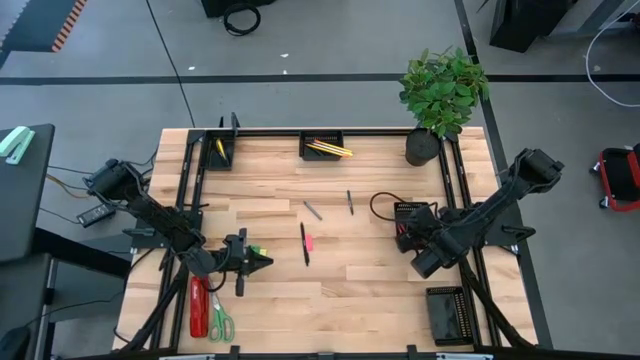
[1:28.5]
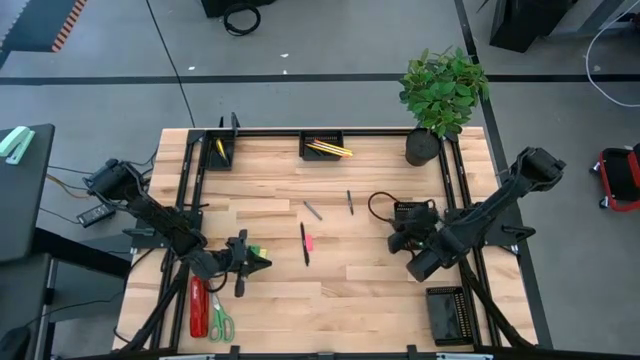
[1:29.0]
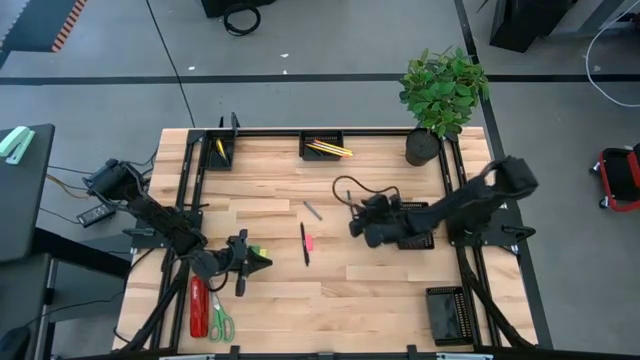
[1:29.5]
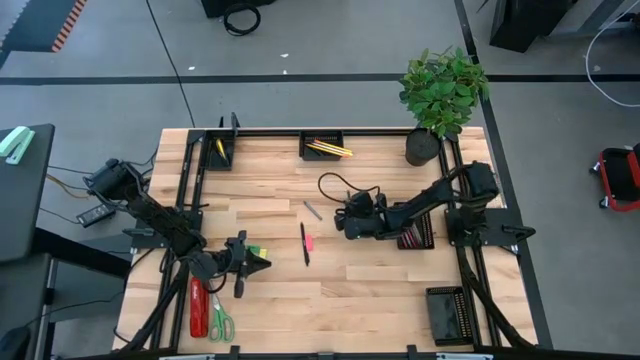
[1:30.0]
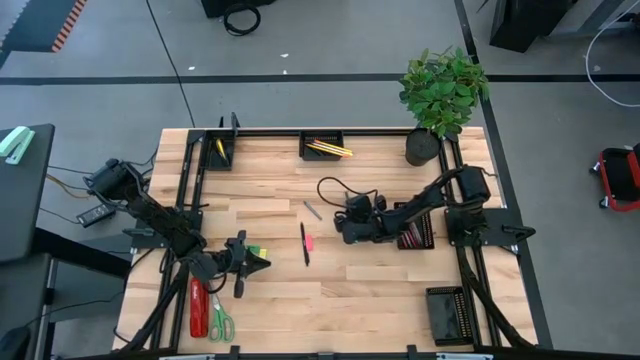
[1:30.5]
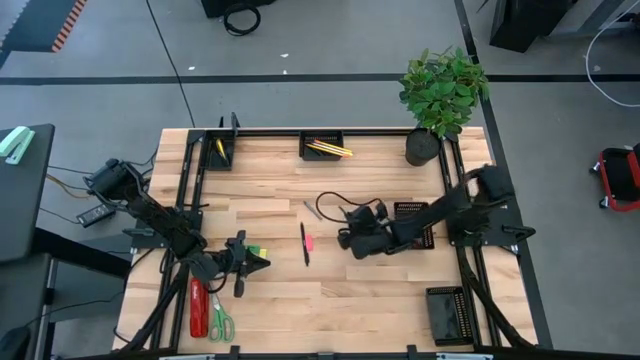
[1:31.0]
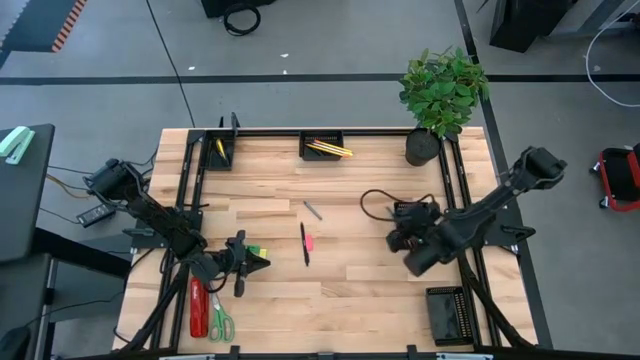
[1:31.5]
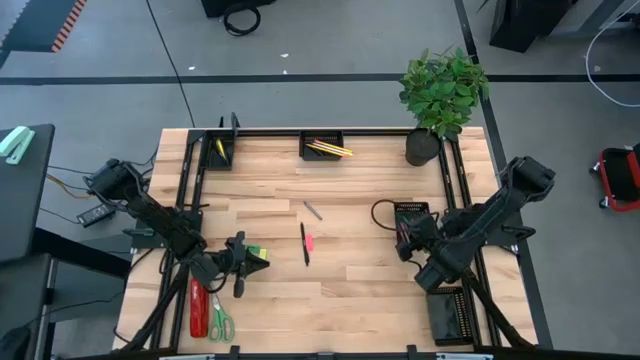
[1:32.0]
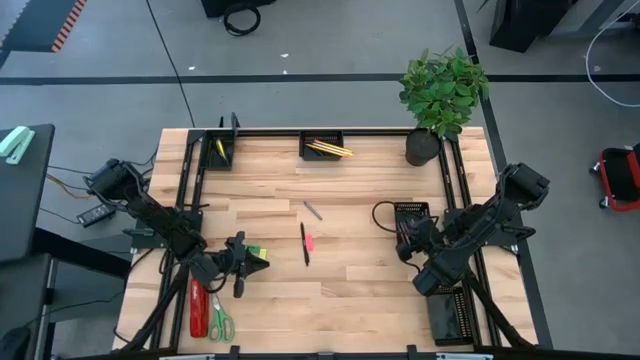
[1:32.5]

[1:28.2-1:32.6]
Task: Sort crayons/erasers/pens/pencils in bins
Put the green crayon into the middle right black bin

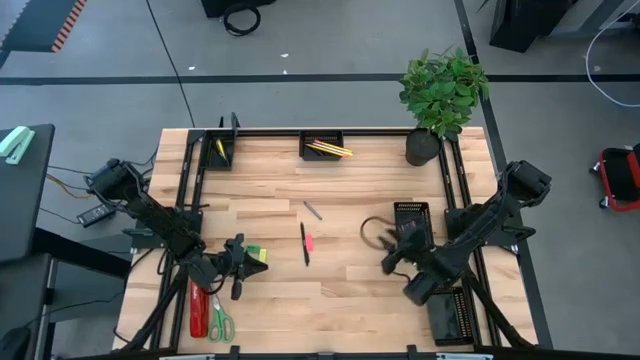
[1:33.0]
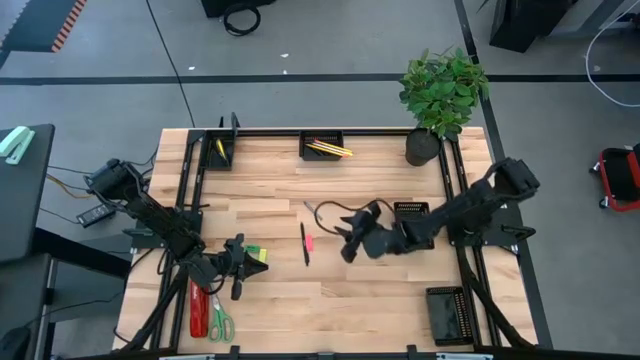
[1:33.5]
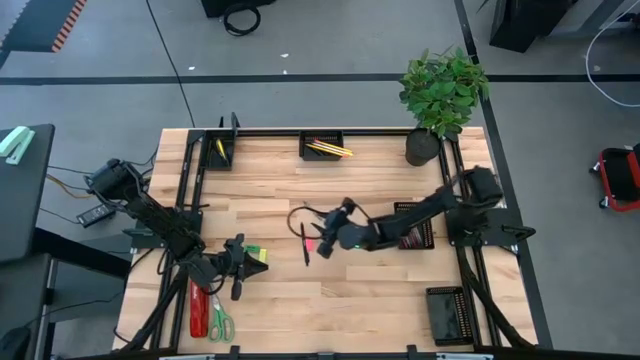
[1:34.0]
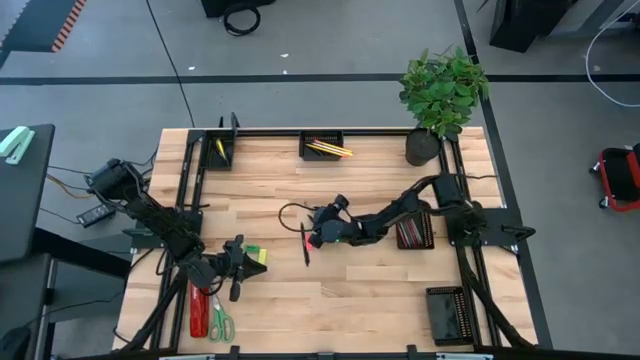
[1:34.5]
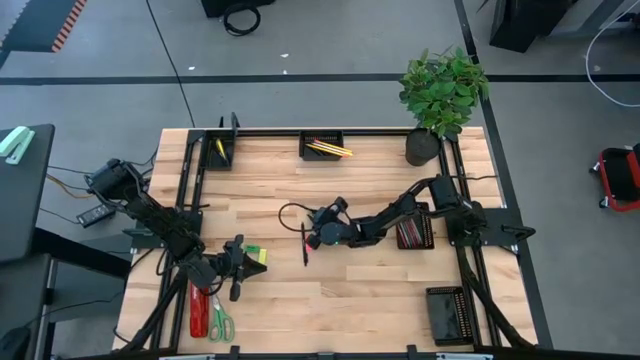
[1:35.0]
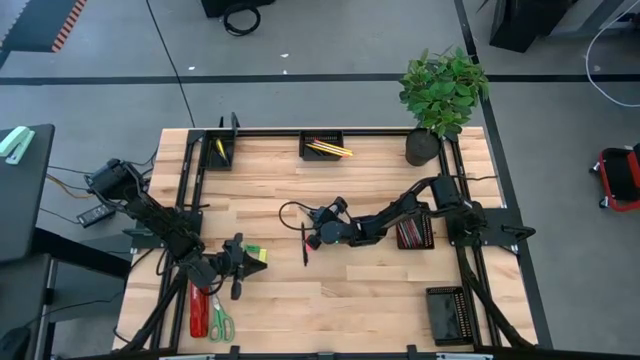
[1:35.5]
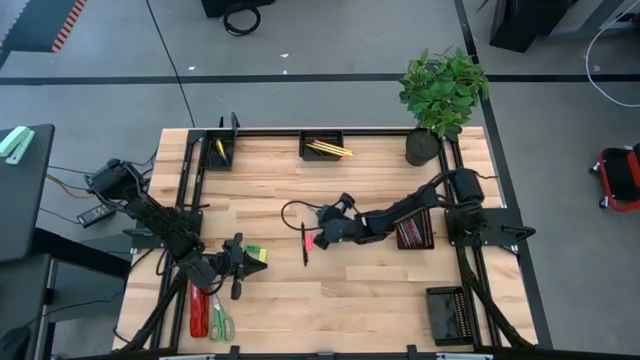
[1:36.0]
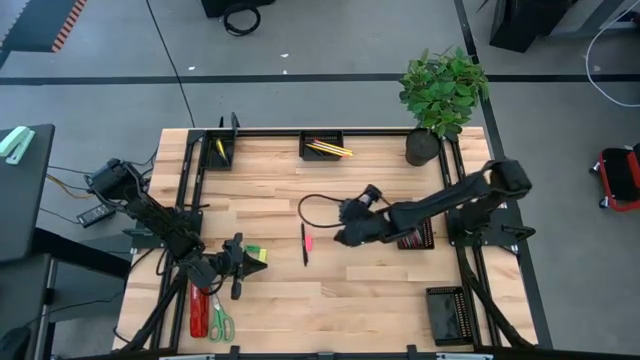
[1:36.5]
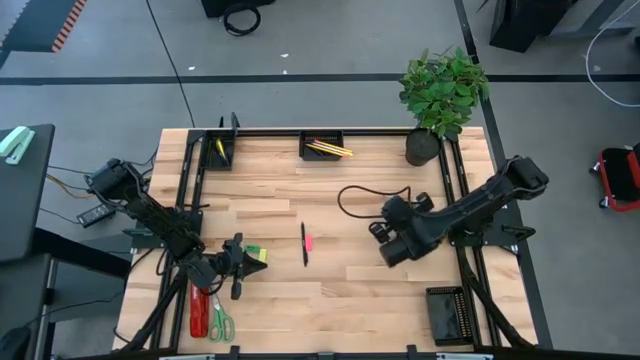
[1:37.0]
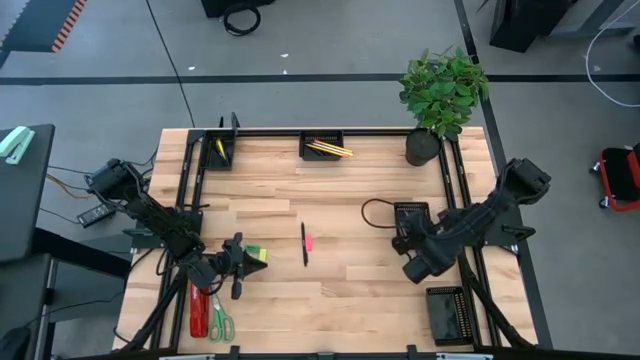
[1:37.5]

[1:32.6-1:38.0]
Put the gray crayon into the middle right black bin

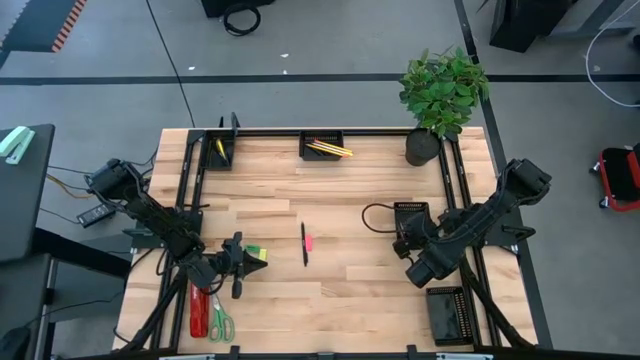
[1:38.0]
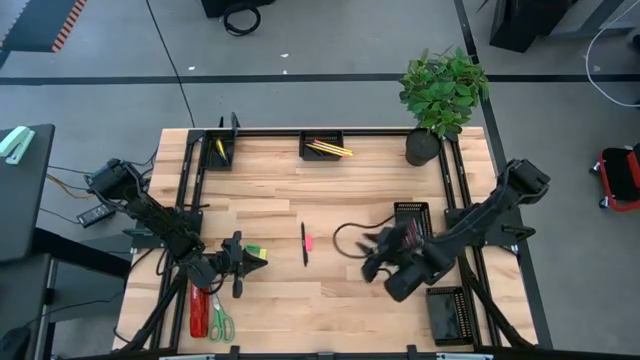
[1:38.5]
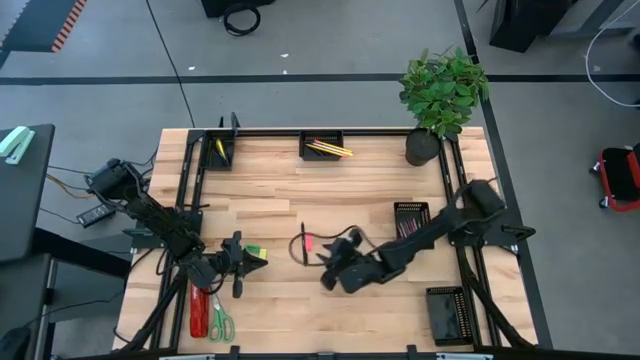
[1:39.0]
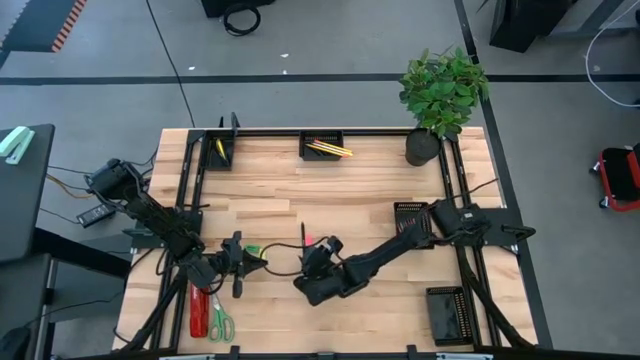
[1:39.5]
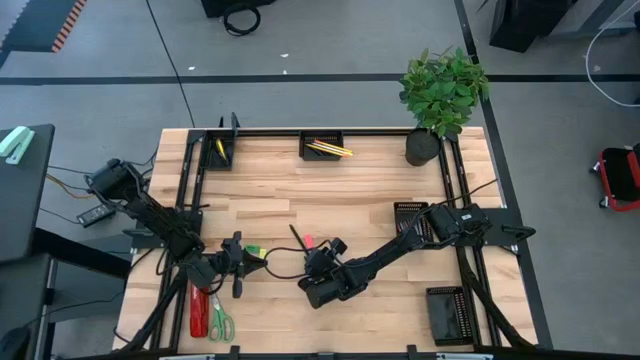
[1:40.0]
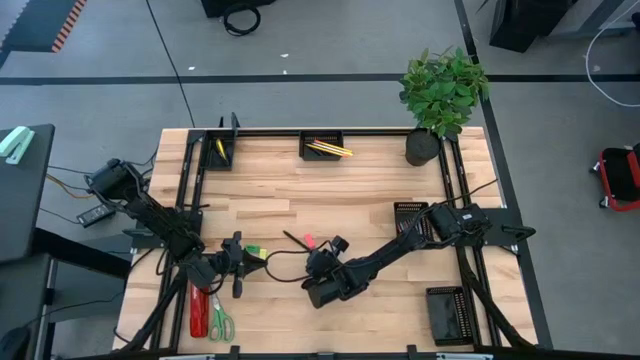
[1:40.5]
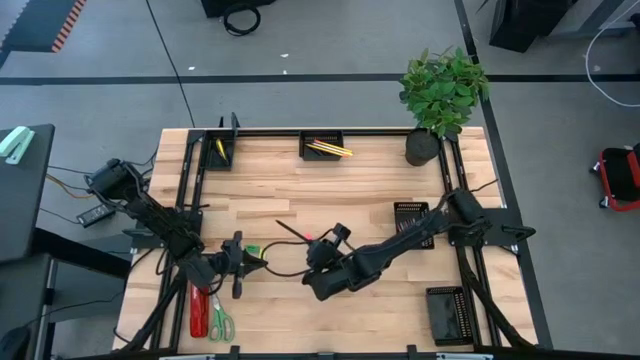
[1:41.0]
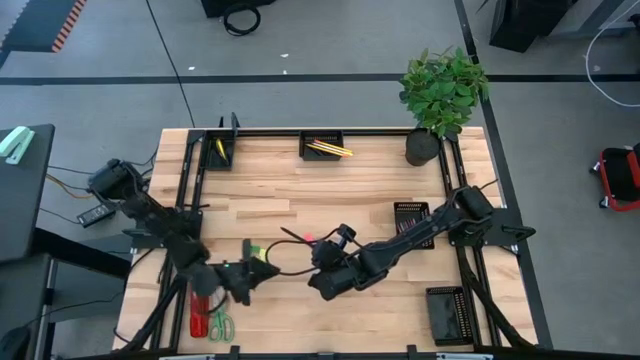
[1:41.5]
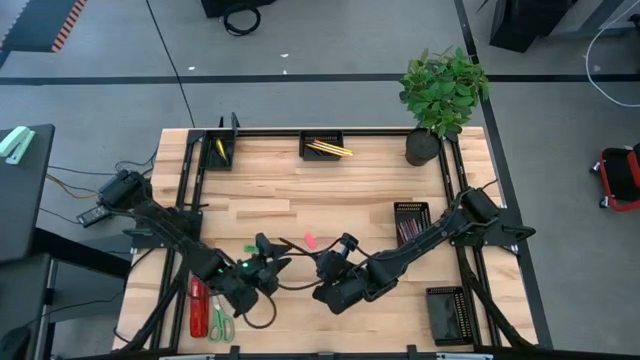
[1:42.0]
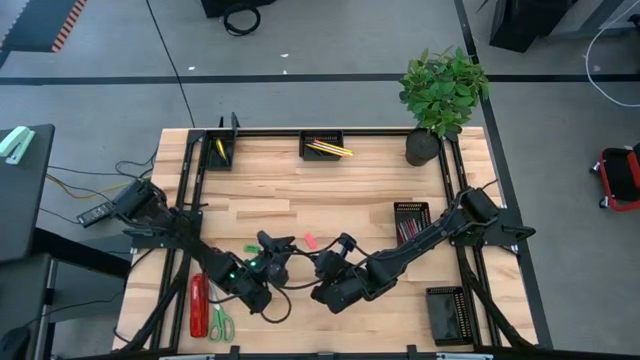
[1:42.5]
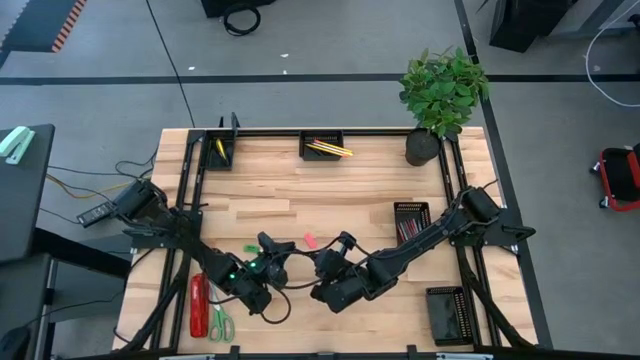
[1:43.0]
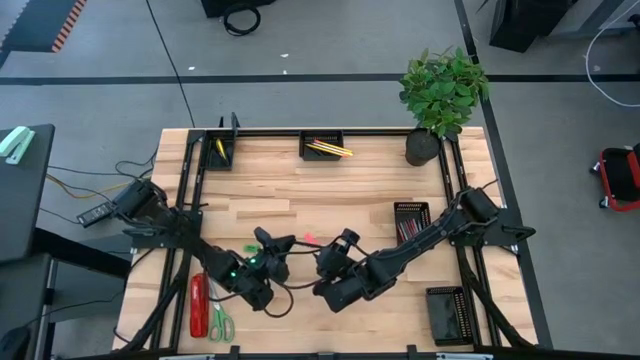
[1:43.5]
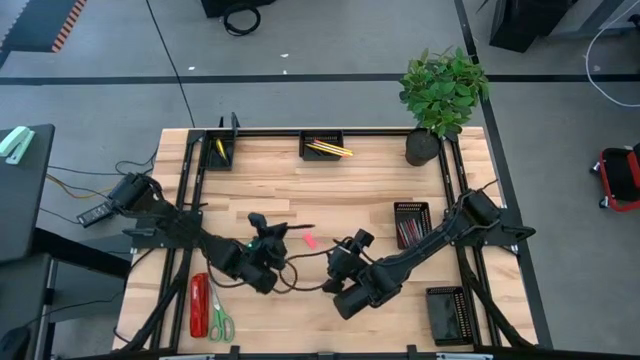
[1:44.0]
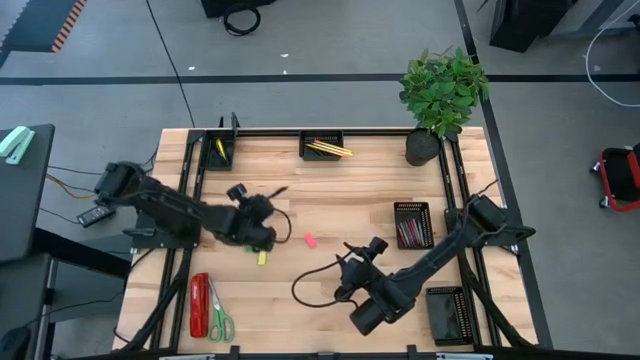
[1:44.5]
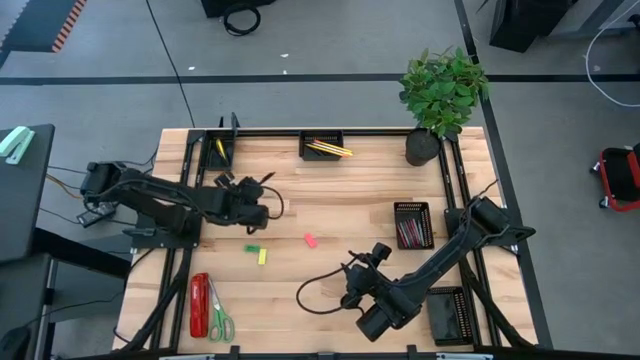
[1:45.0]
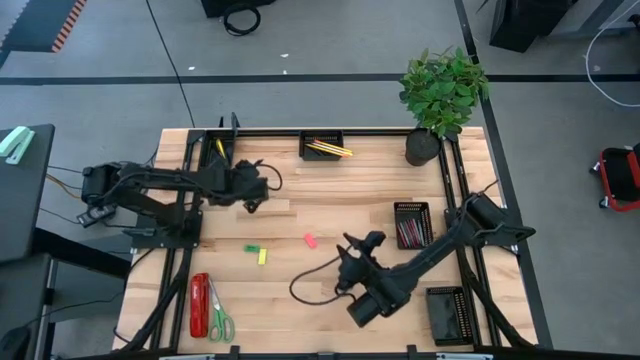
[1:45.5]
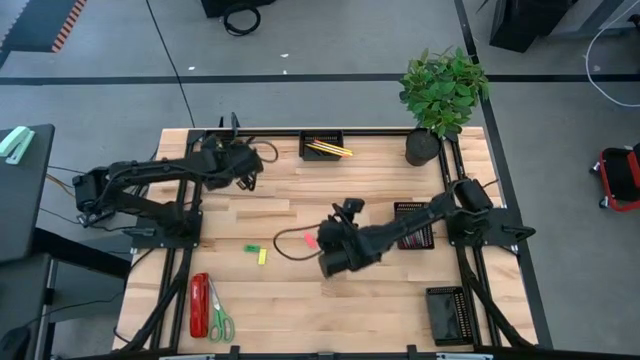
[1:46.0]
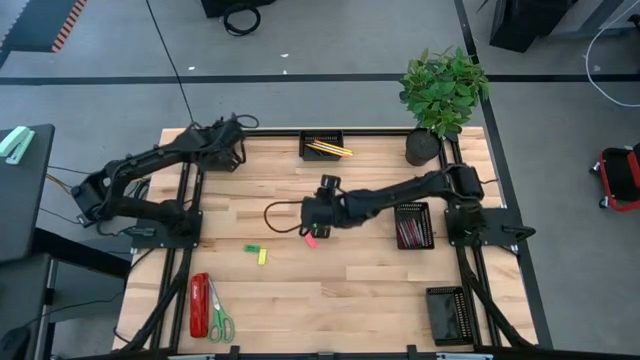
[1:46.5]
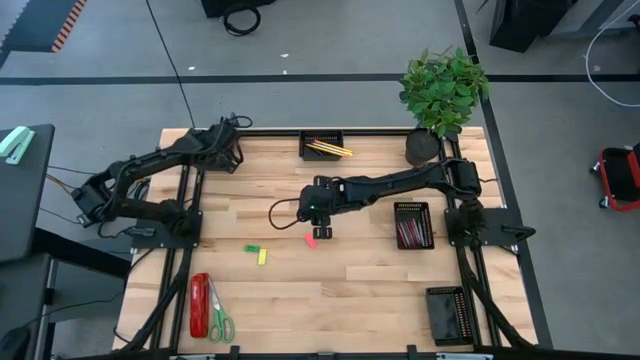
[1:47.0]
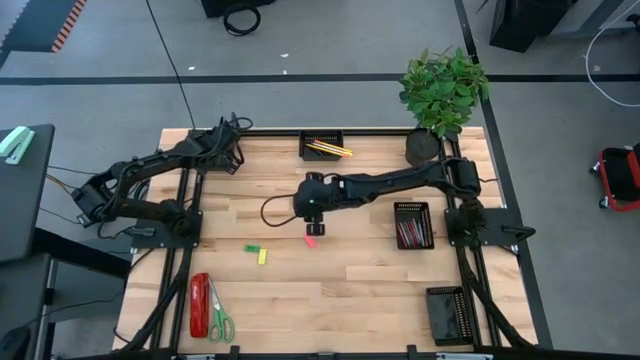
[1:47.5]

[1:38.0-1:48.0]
Put the black pen into the top left black bin
